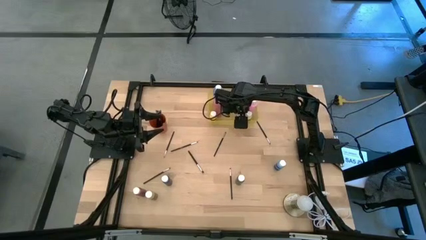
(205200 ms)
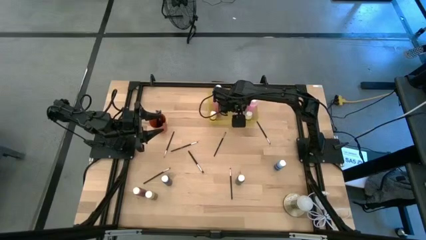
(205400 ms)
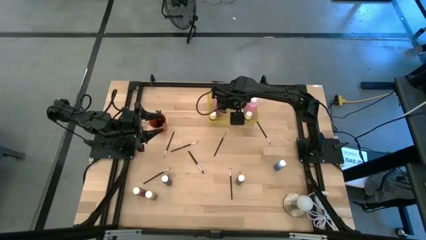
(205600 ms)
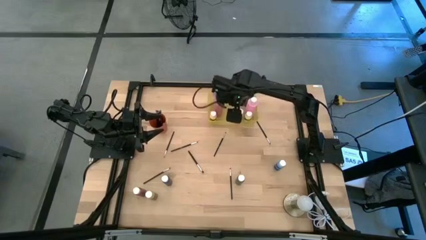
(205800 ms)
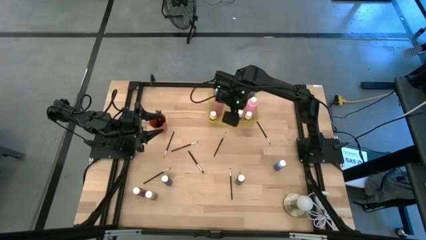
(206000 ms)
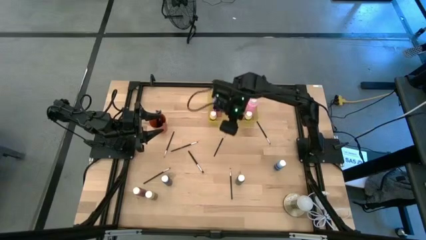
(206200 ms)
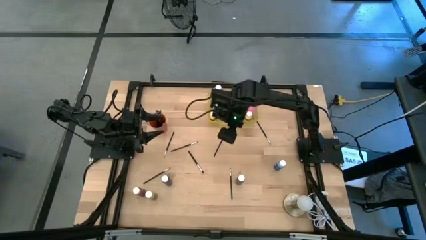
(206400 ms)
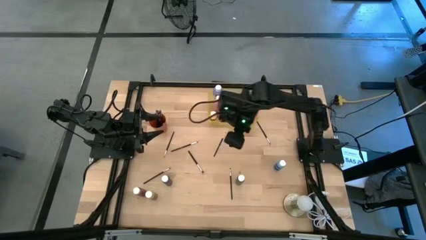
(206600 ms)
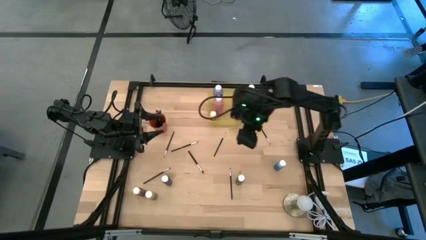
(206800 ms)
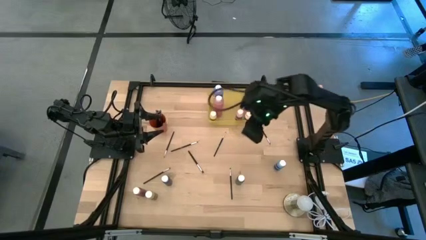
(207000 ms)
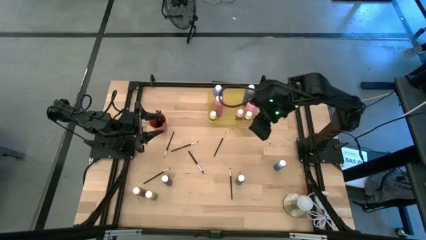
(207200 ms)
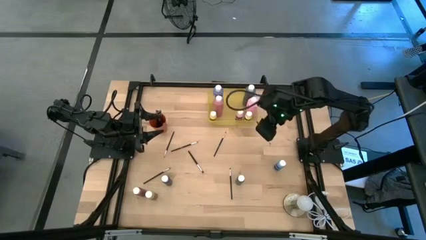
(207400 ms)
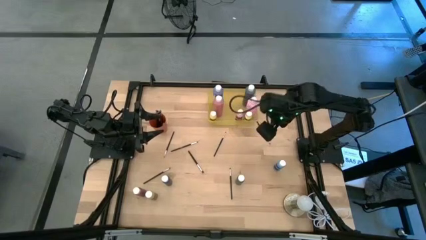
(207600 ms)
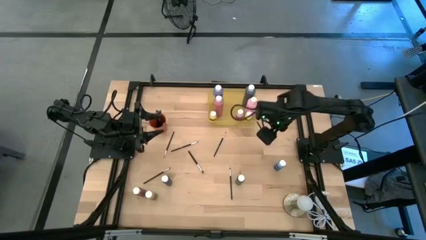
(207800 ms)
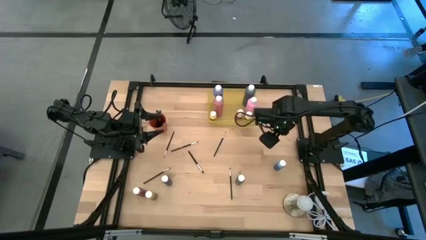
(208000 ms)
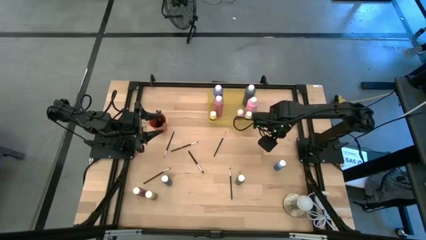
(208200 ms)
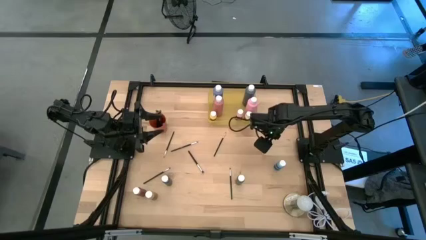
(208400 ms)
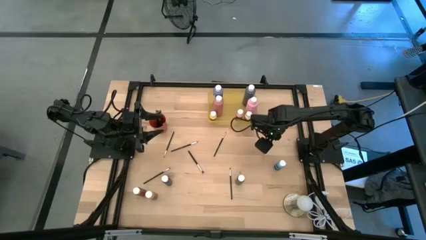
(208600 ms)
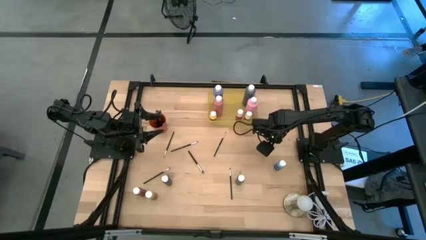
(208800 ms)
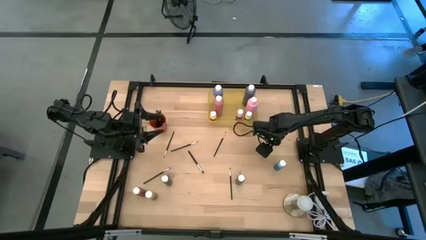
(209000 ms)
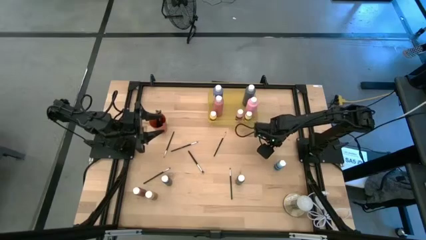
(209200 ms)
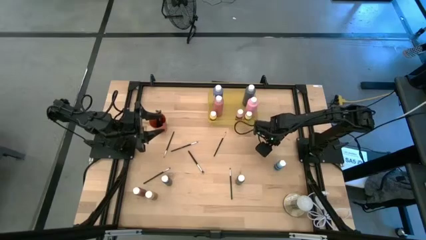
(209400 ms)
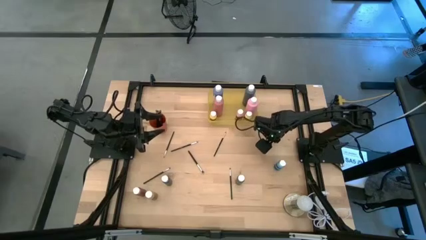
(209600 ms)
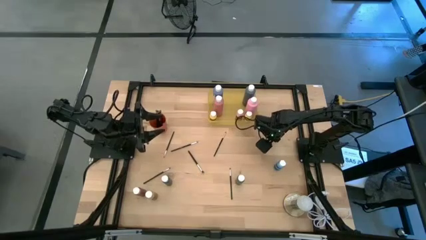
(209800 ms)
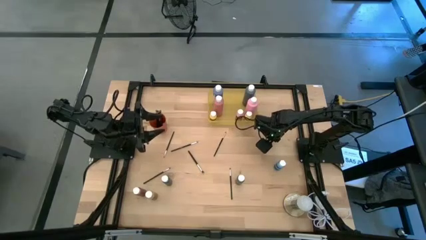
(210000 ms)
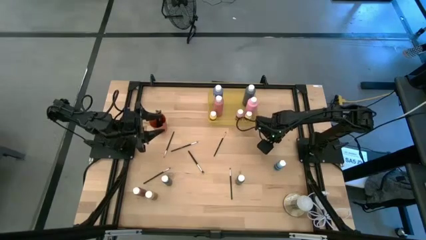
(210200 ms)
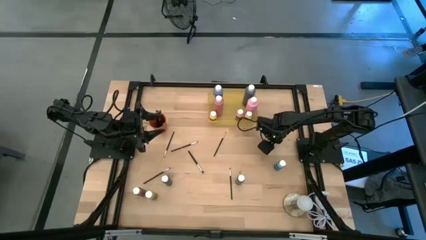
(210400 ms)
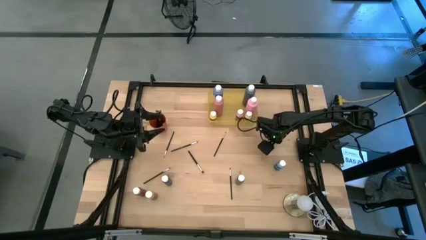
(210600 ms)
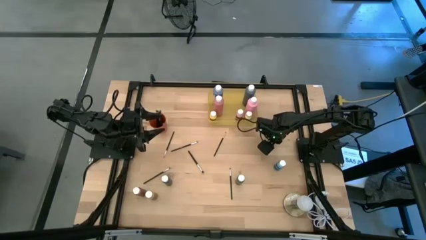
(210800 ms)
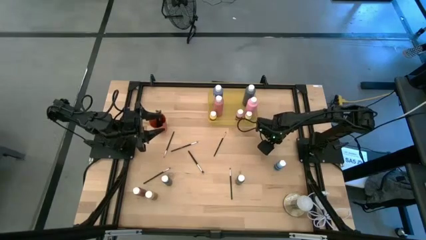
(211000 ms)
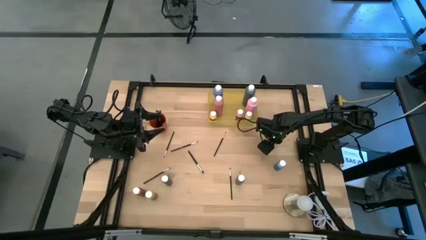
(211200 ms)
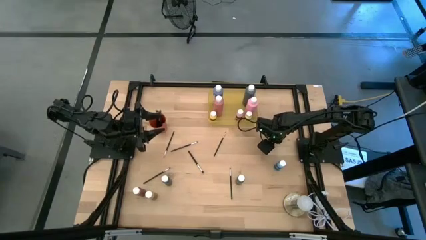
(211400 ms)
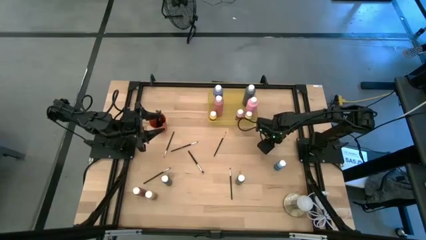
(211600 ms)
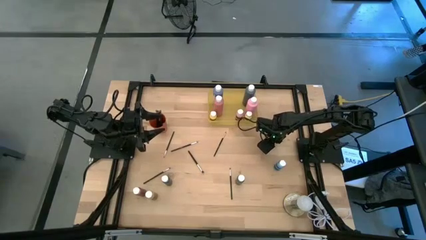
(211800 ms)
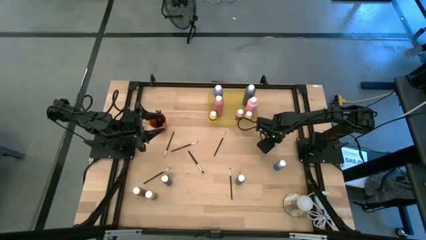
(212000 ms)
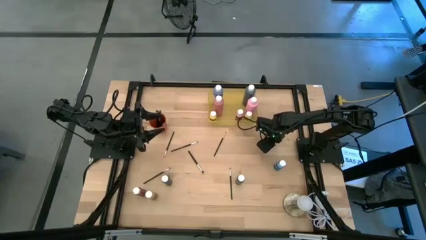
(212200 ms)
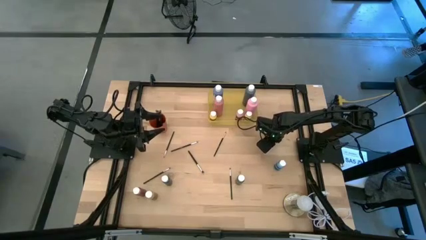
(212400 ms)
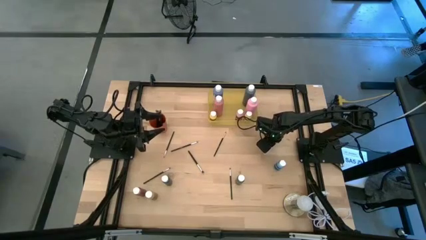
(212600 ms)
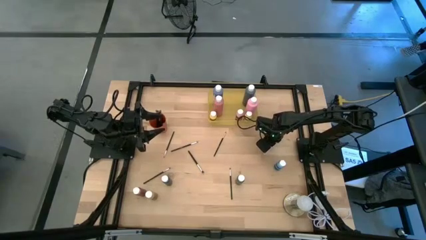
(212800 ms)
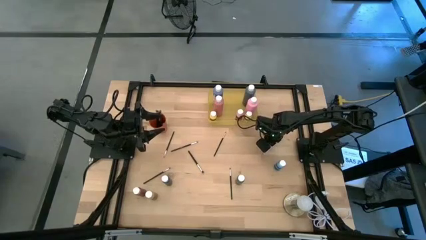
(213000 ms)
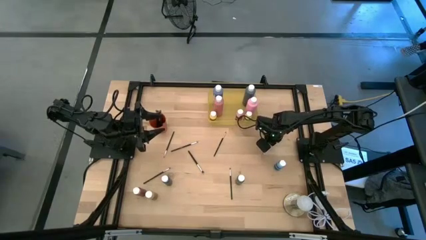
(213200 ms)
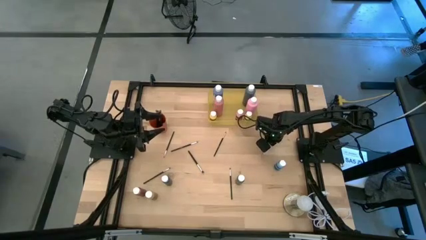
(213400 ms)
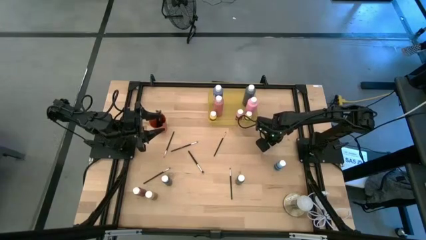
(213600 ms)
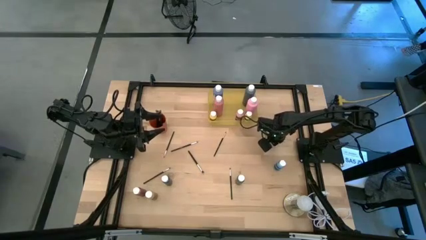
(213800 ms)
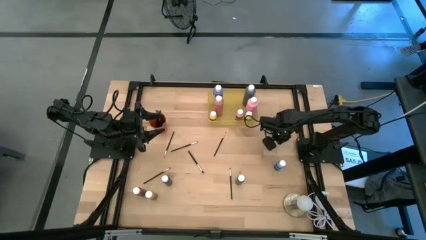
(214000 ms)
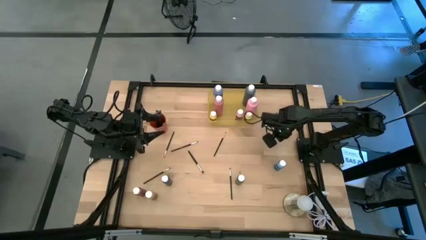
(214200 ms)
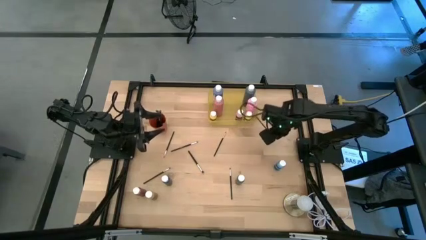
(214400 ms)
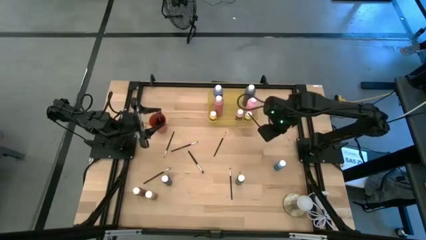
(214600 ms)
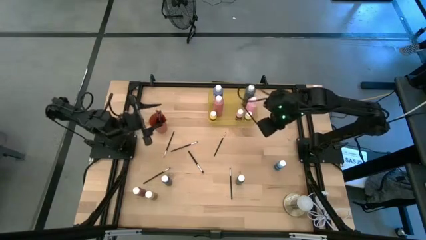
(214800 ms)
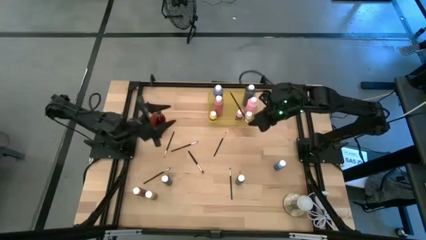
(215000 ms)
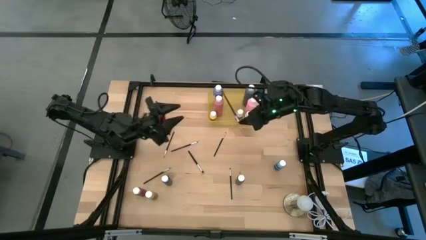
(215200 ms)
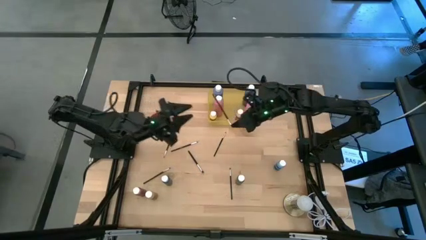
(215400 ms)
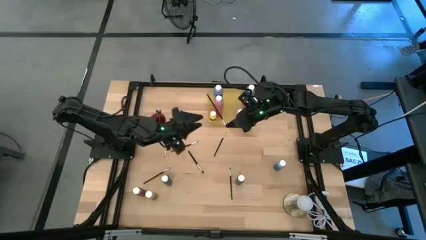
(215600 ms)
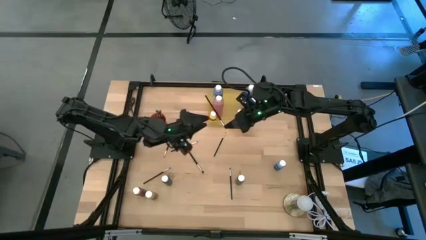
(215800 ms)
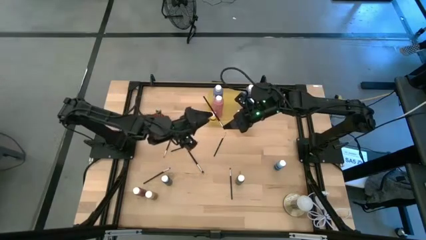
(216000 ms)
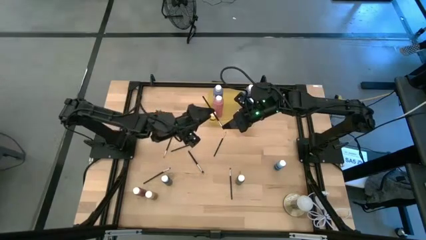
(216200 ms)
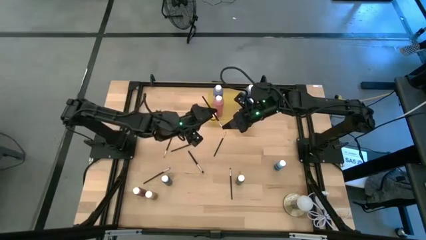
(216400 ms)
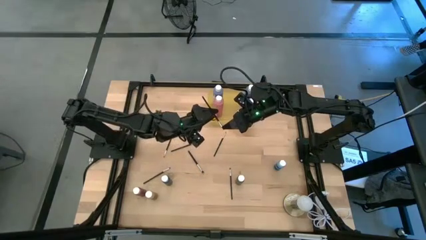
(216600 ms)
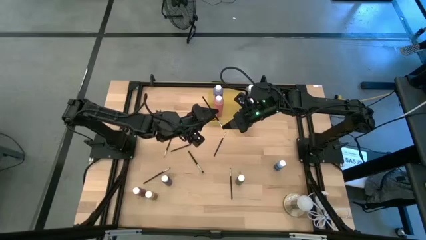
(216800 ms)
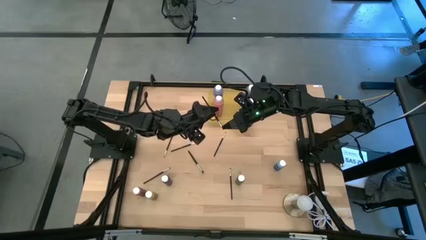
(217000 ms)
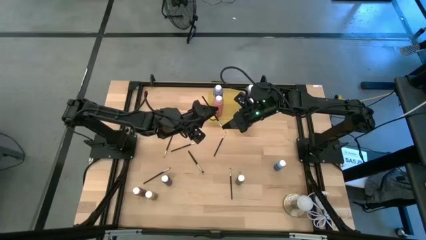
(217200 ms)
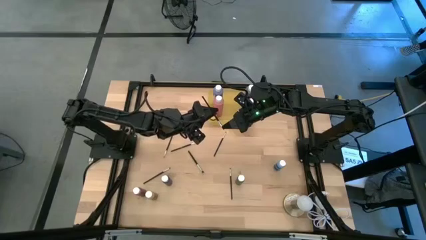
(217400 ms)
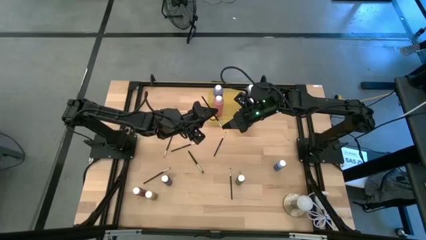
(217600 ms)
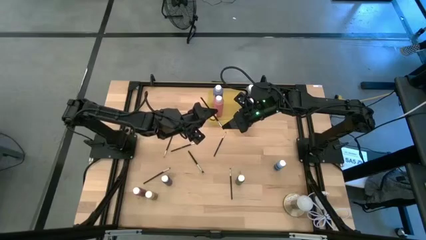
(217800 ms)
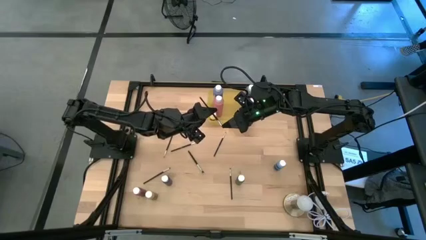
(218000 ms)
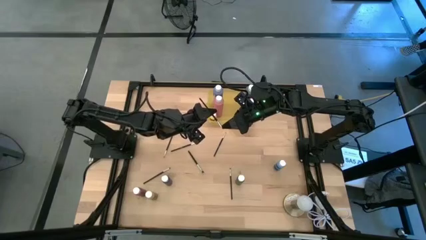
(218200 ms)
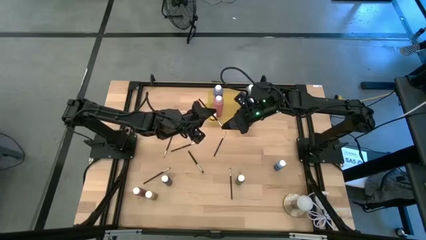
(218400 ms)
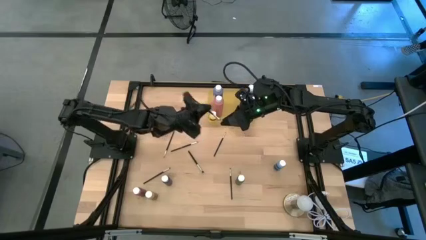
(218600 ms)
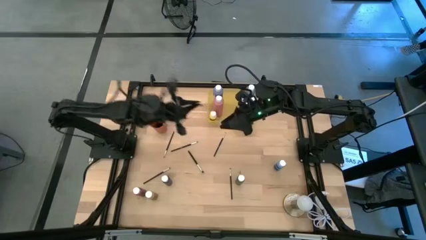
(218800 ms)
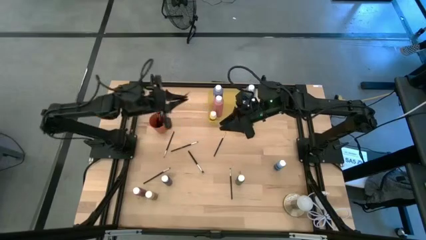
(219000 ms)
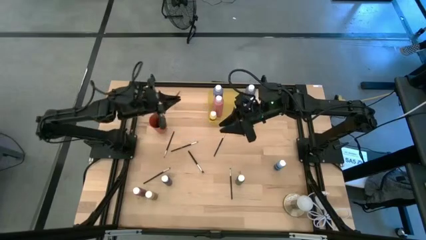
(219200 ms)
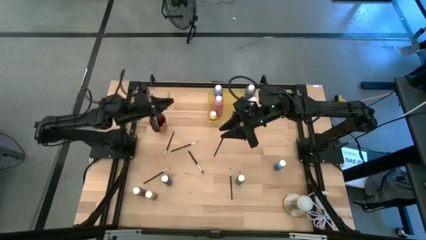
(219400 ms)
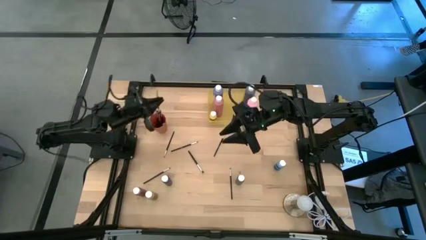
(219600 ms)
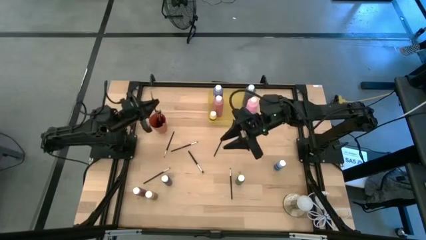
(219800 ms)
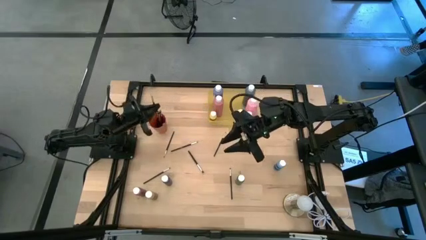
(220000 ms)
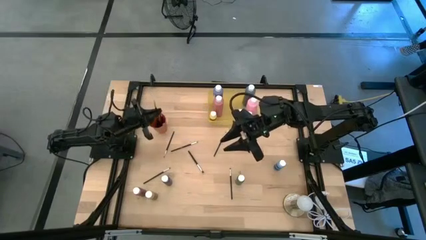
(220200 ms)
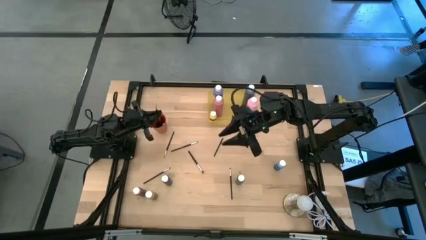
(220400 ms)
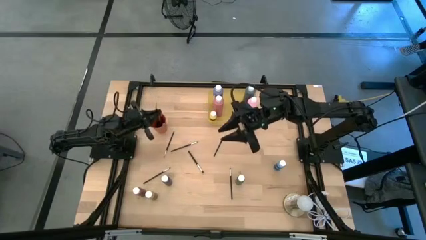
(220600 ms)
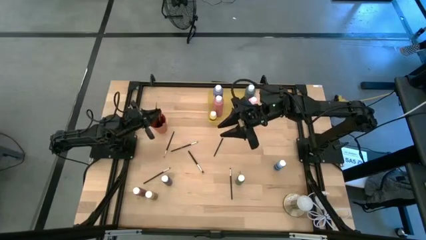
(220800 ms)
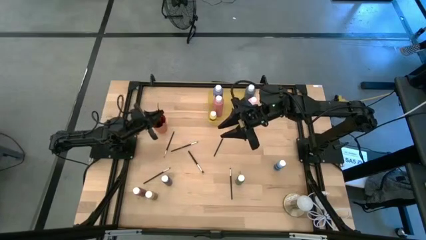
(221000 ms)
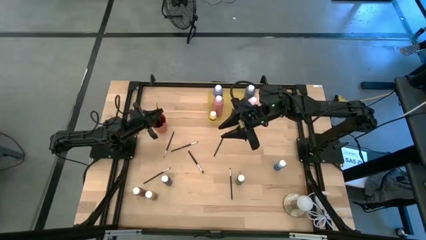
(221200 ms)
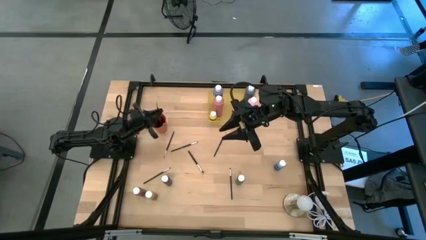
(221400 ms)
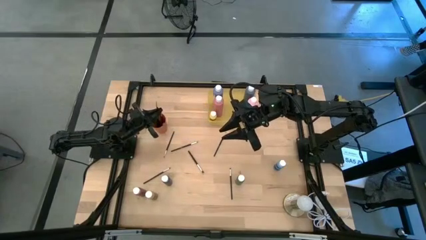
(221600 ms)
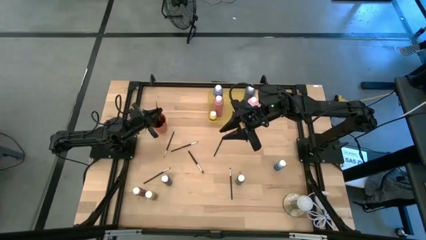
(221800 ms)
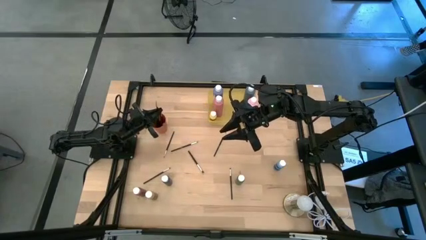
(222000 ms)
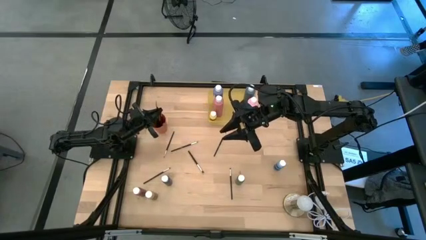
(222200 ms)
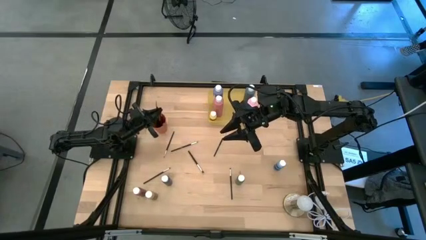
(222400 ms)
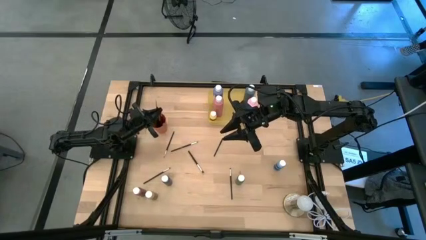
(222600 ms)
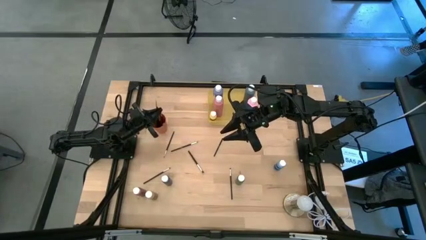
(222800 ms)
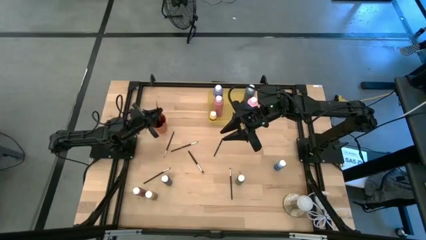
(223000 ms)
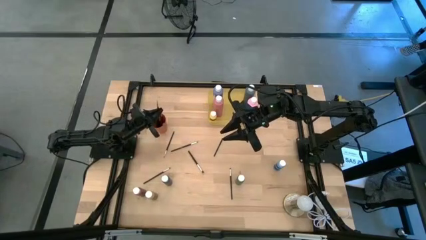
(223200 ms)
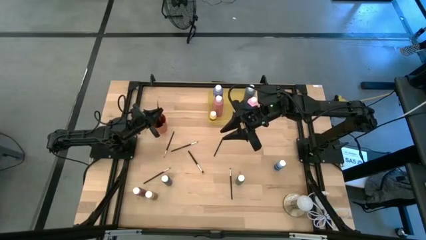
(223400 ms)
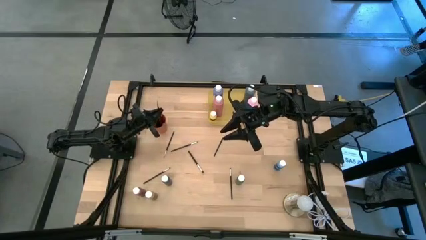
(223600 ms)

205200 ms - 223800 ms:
Task: Pick & Place Paint Supplies
Put the silver paint brush into the orange cup
